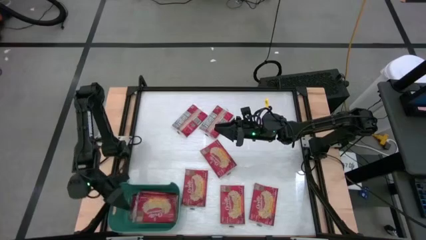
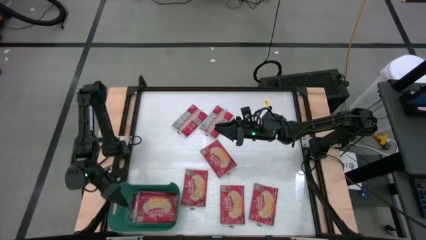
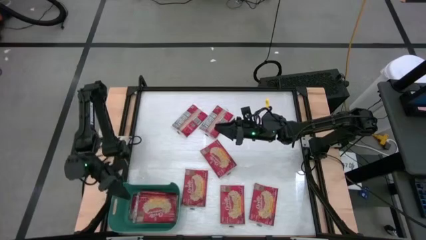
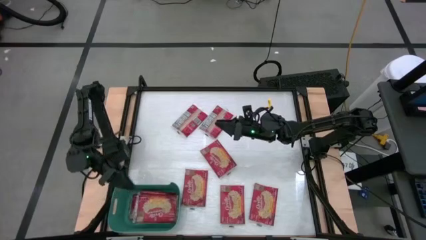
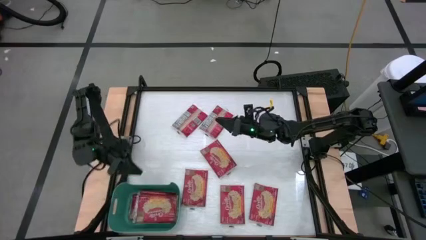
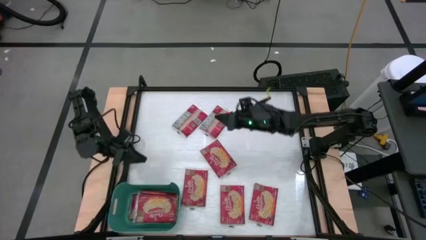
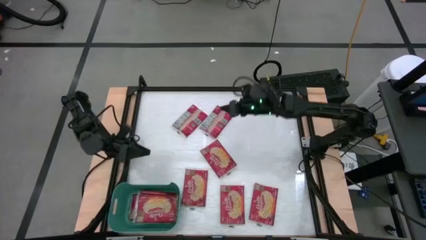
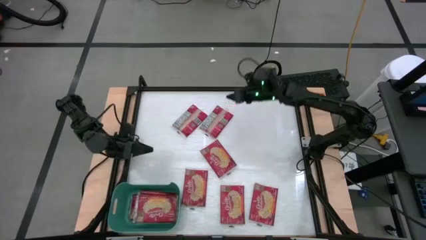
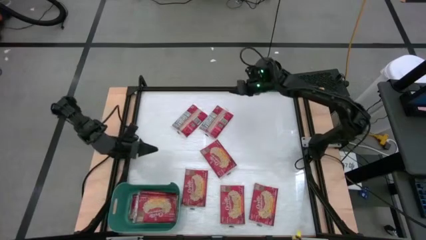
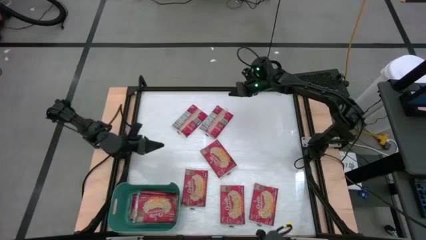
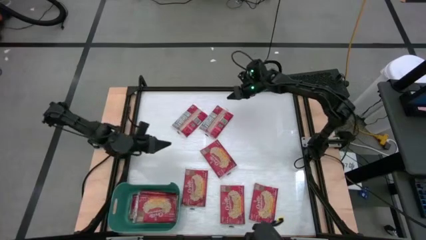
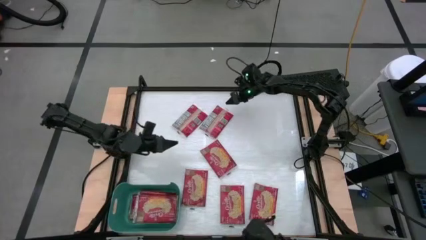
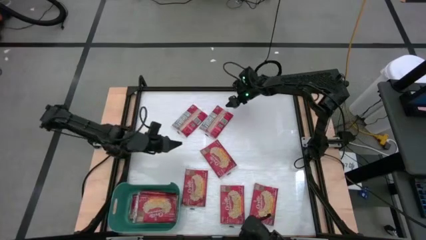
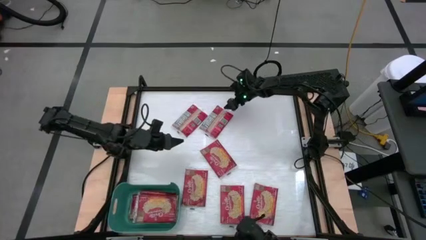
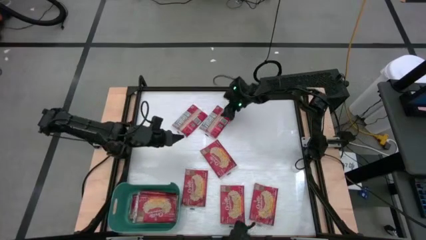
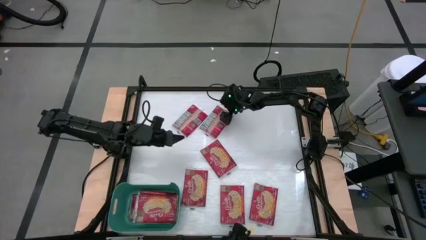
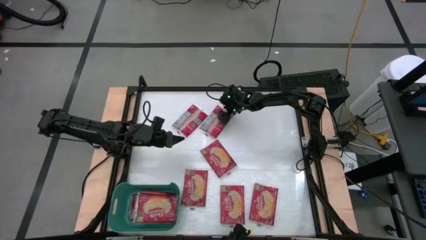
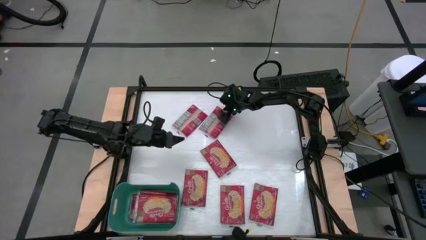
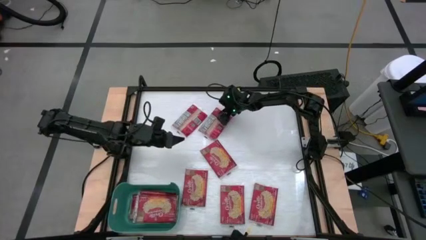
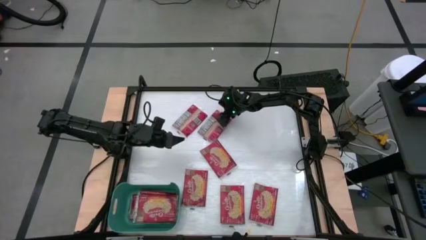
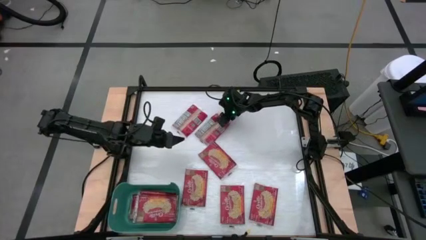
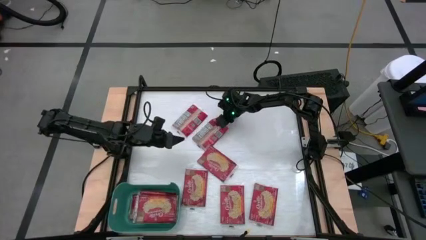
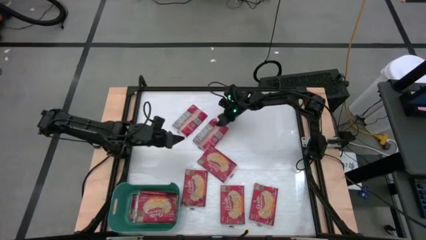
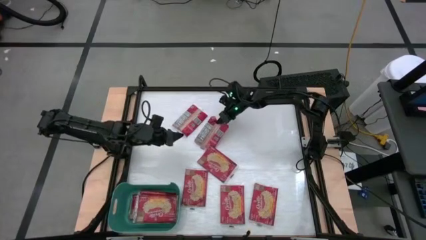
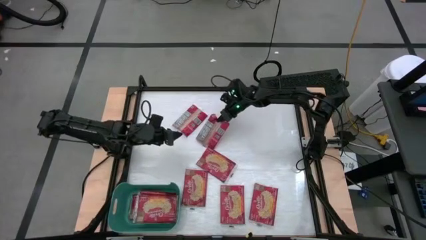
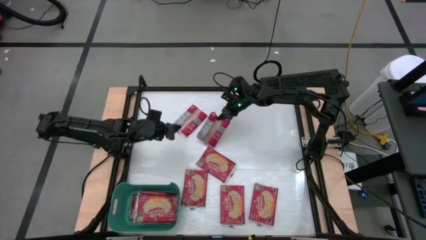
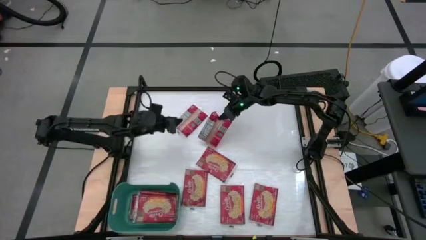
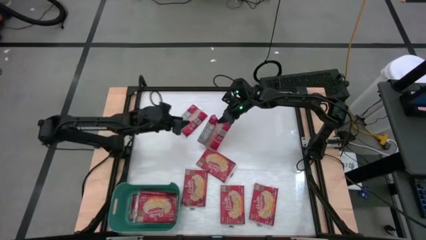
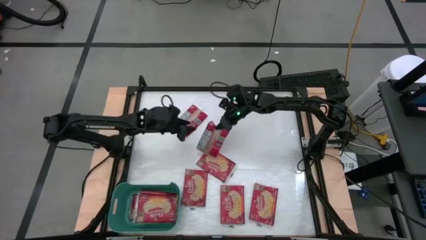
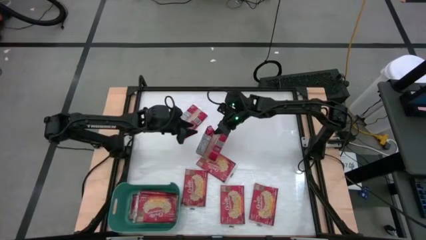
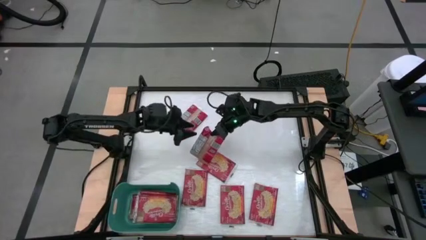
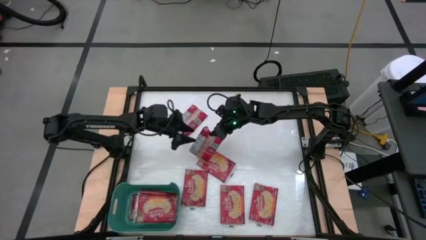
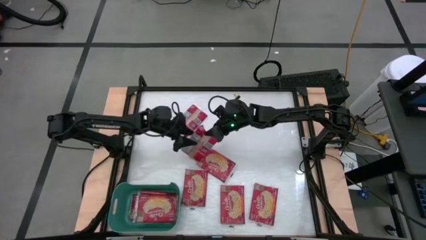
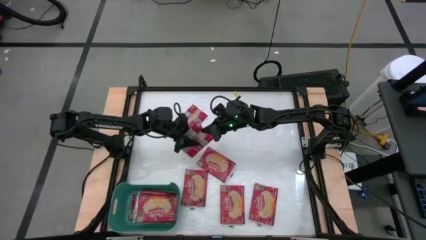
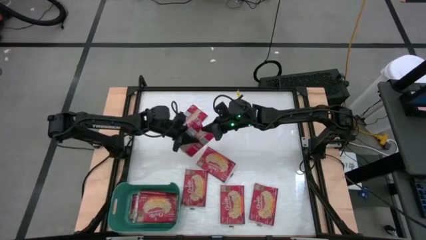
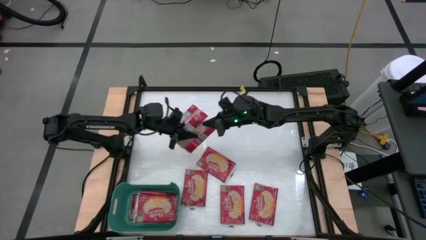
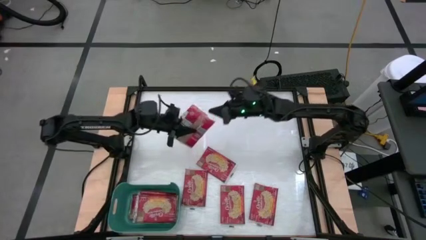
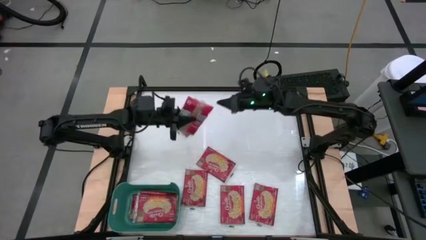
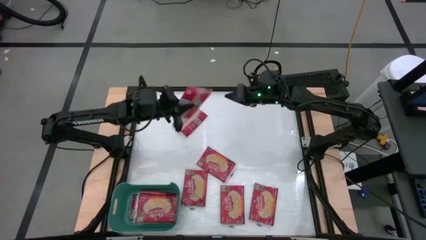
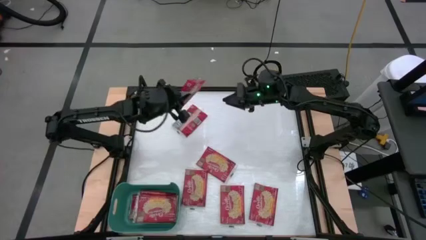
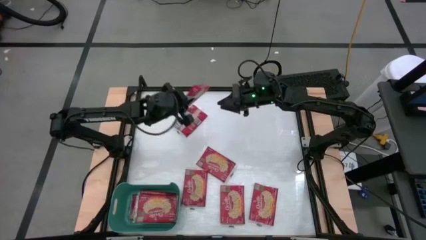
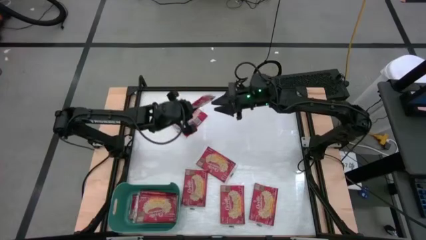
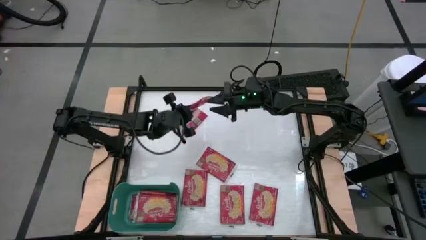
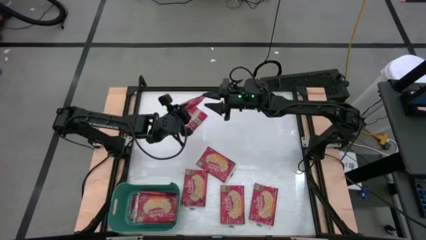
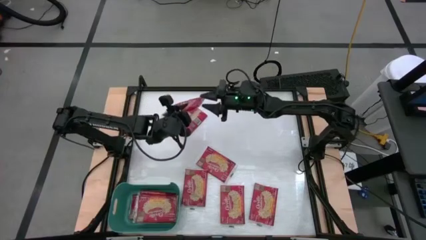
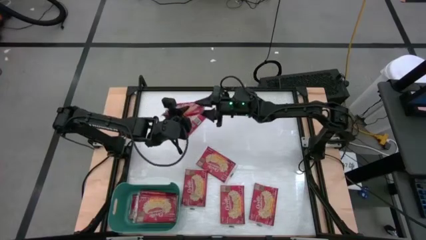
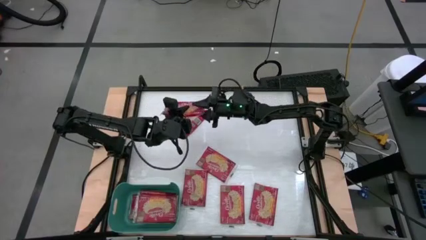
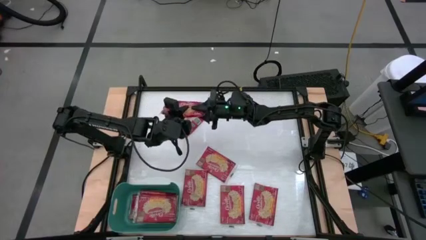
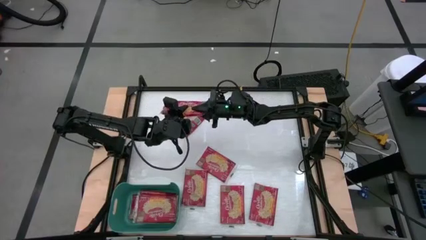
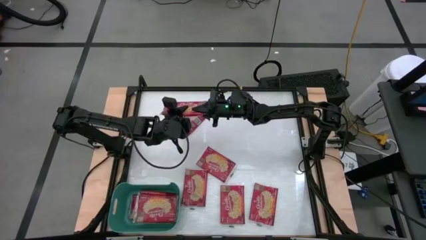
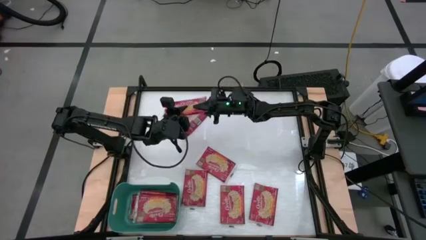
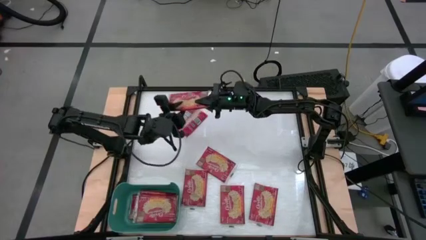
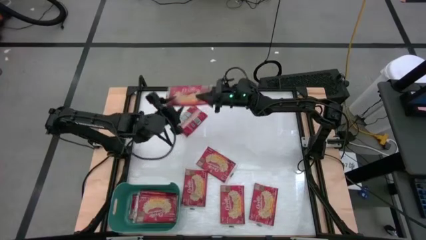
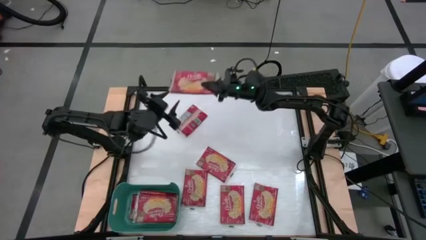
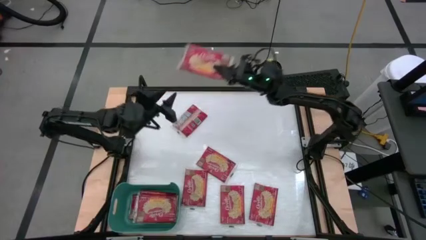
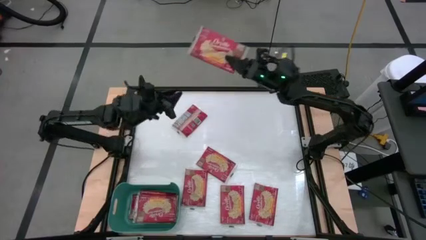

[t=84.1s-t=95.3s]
Task: Sort popcorn bags into baskets
Put the red popcorn bag into the green bin

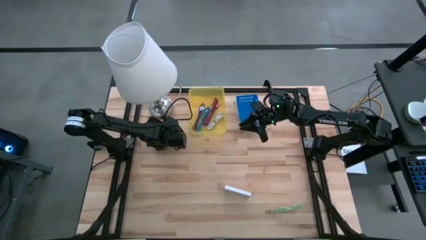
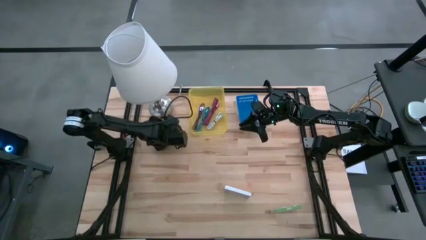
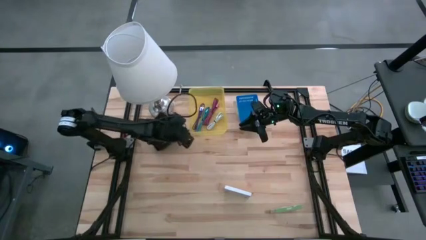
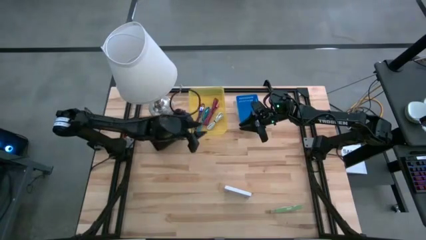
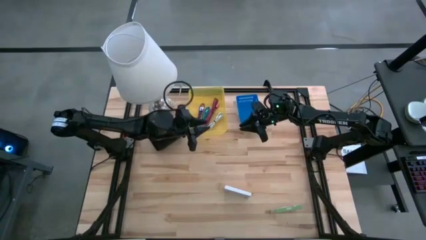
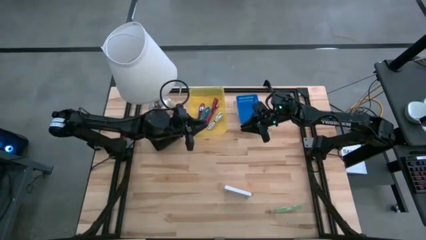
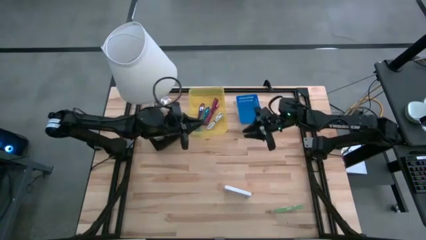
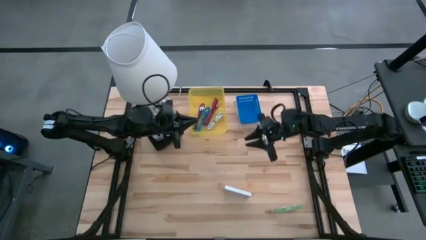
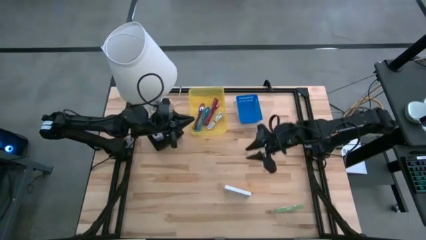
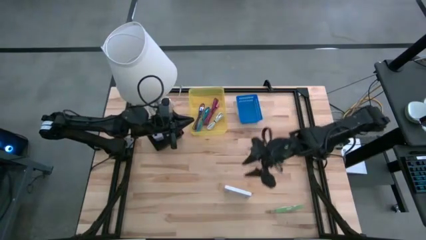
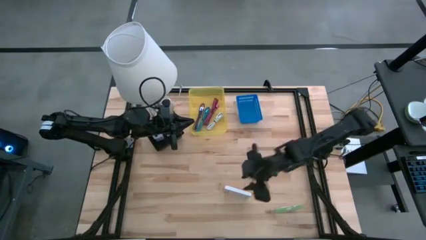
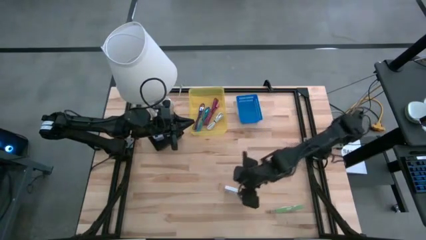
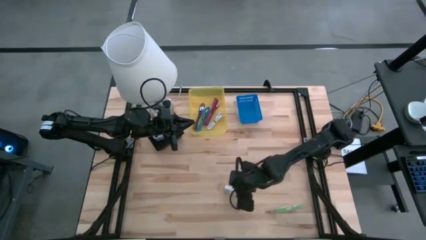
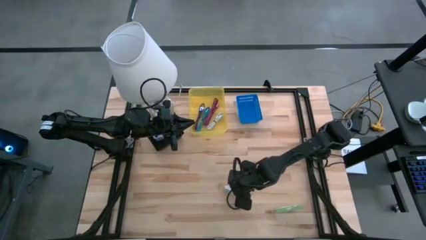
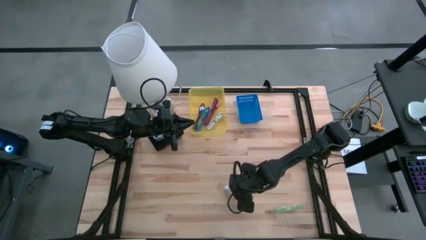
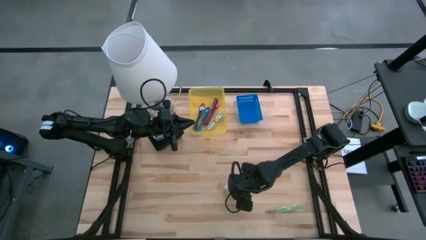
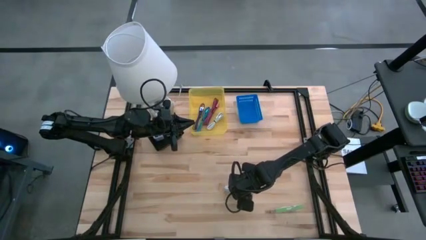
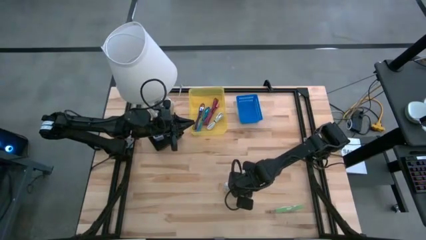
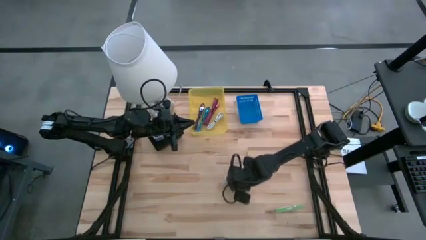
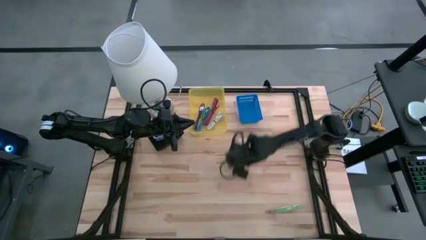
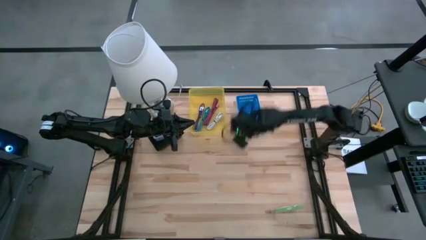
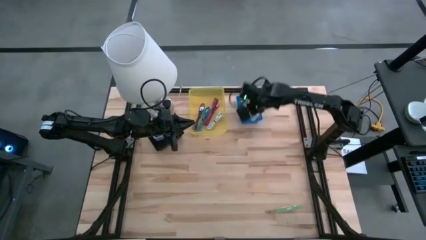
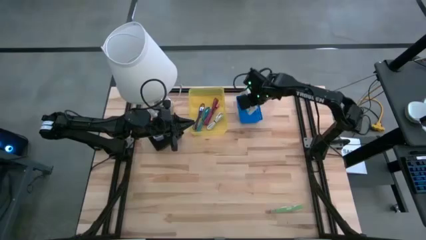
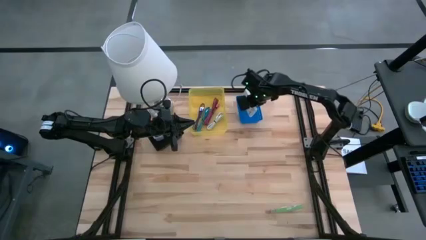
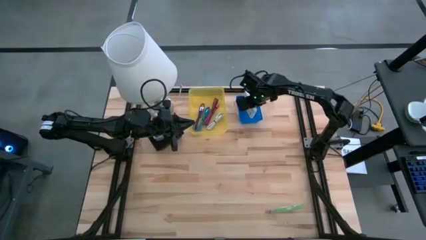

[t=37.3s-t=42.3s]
Task: Pick and place items into bin
Put the left white box into the blue bin
